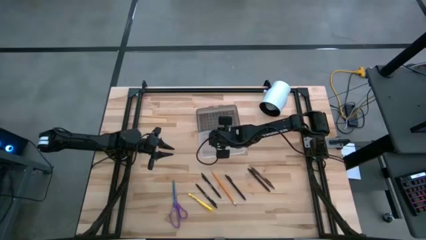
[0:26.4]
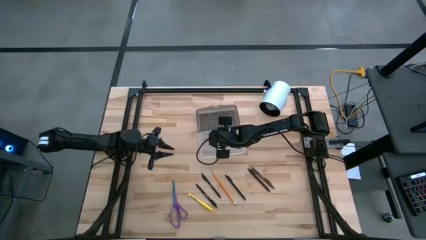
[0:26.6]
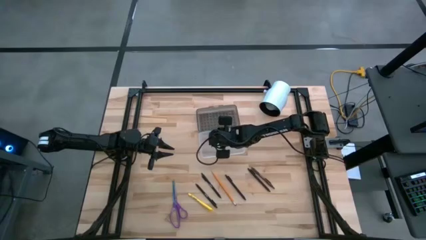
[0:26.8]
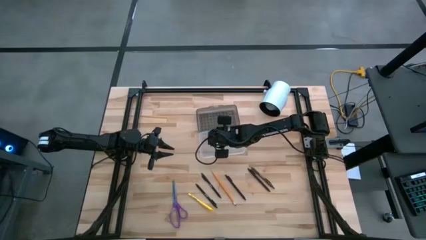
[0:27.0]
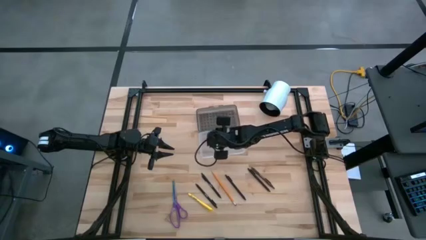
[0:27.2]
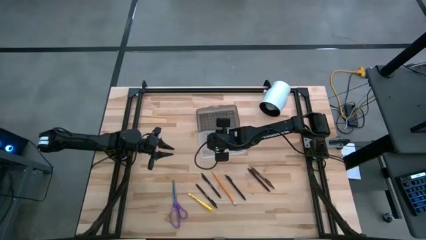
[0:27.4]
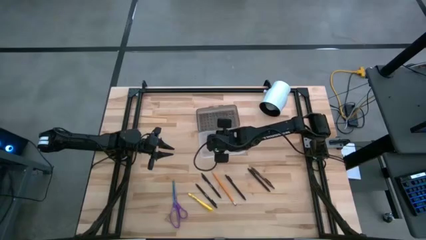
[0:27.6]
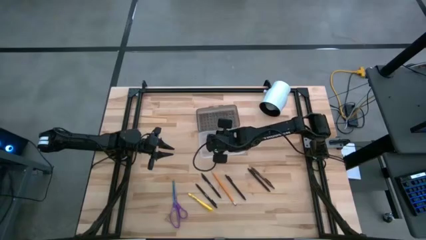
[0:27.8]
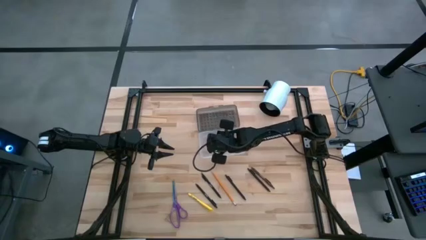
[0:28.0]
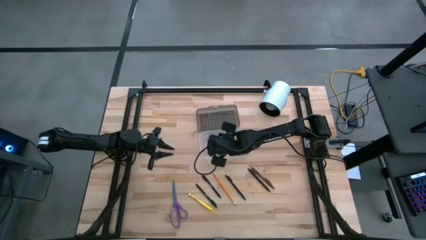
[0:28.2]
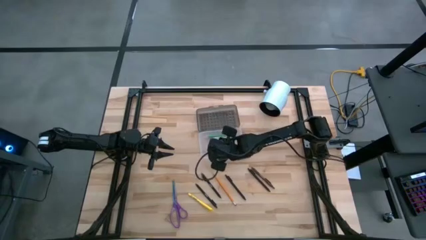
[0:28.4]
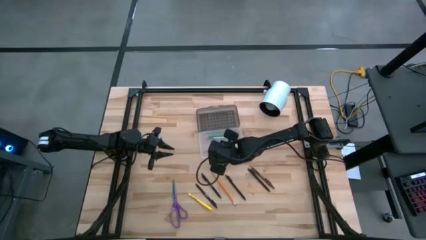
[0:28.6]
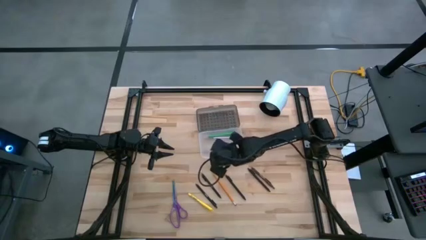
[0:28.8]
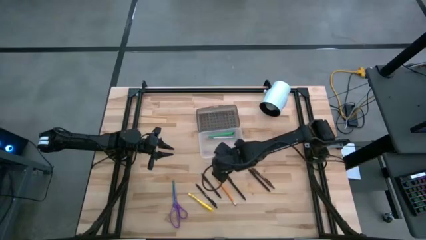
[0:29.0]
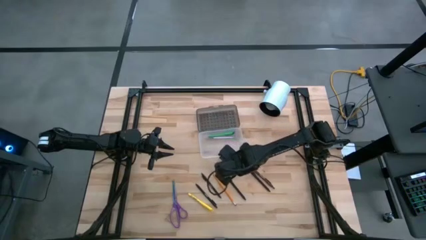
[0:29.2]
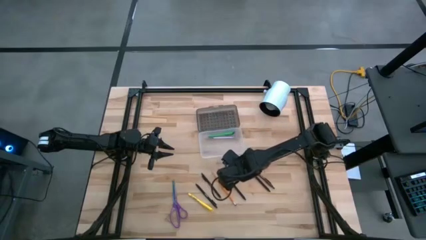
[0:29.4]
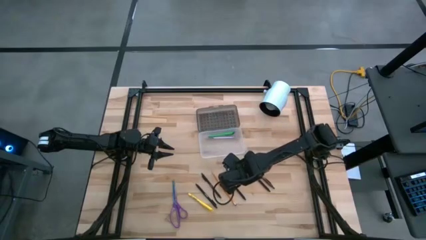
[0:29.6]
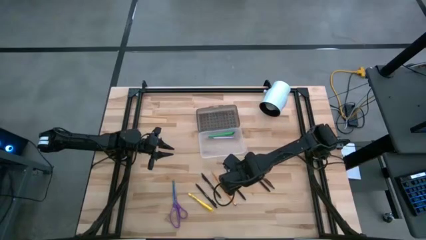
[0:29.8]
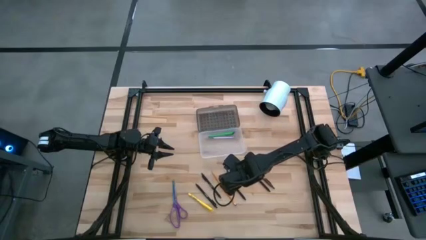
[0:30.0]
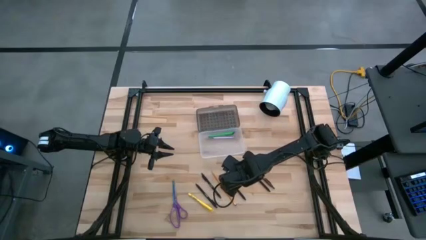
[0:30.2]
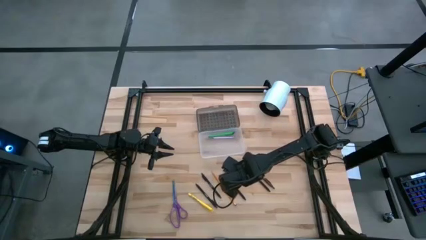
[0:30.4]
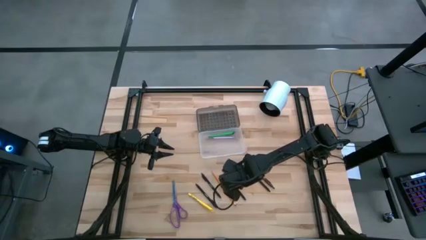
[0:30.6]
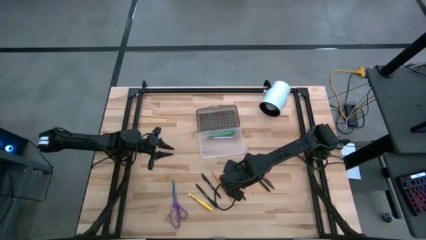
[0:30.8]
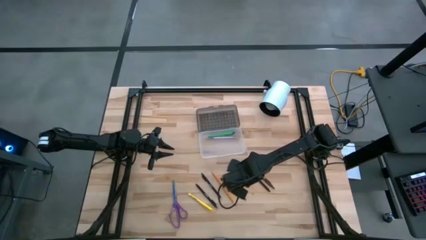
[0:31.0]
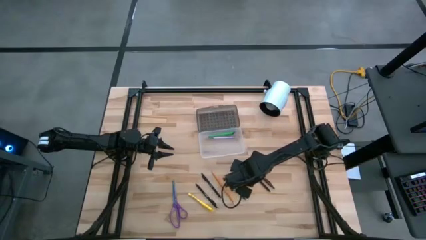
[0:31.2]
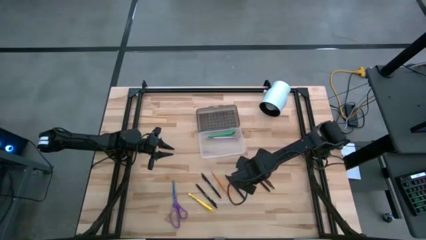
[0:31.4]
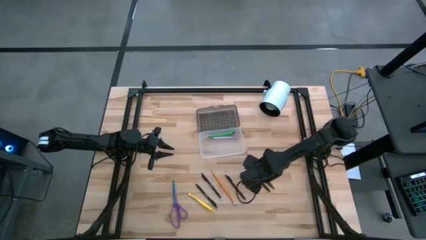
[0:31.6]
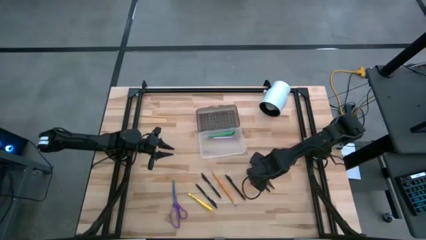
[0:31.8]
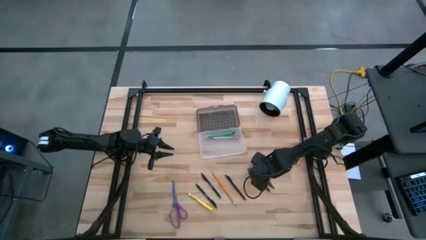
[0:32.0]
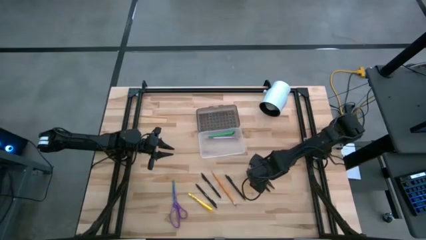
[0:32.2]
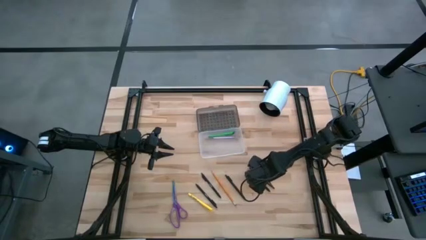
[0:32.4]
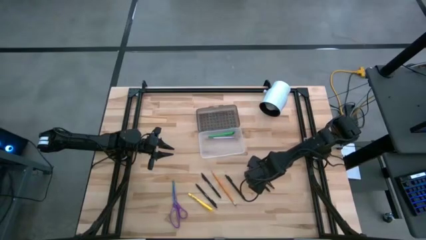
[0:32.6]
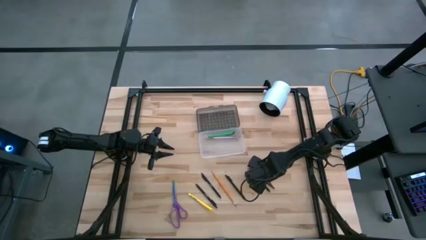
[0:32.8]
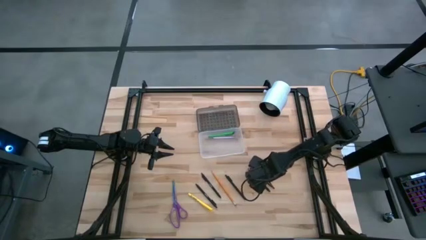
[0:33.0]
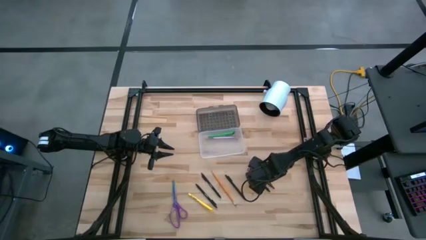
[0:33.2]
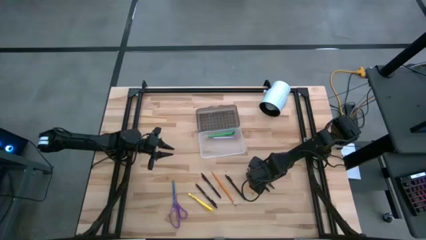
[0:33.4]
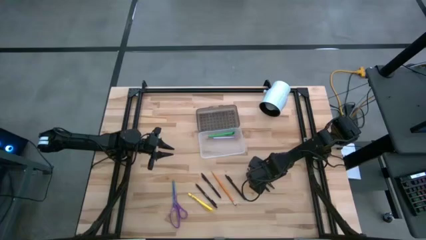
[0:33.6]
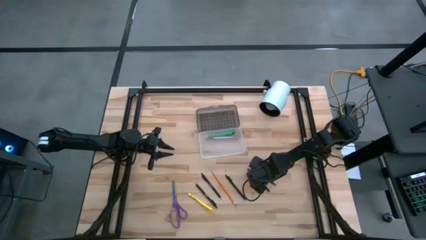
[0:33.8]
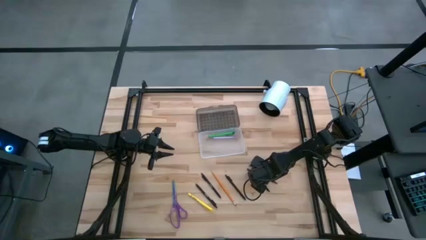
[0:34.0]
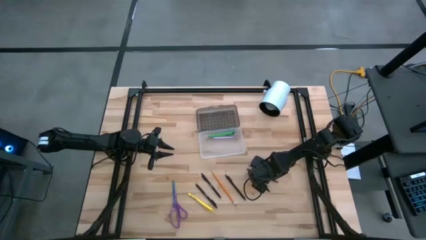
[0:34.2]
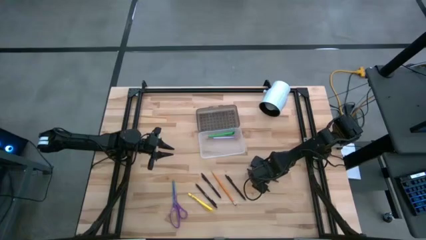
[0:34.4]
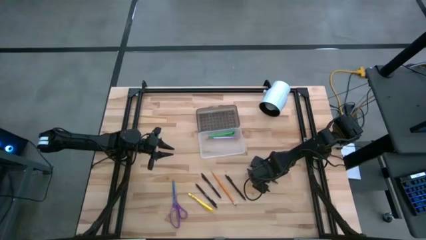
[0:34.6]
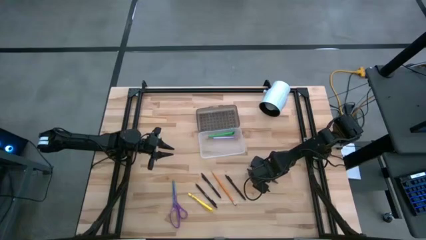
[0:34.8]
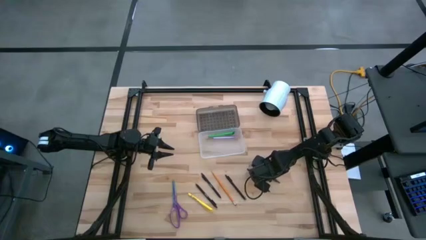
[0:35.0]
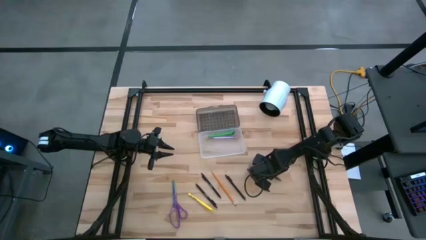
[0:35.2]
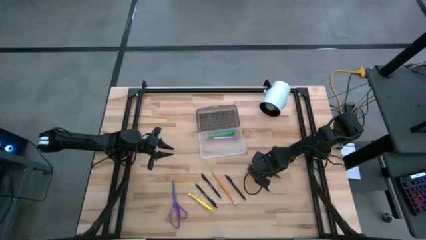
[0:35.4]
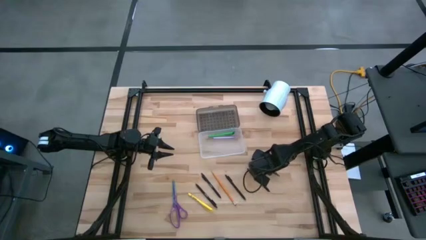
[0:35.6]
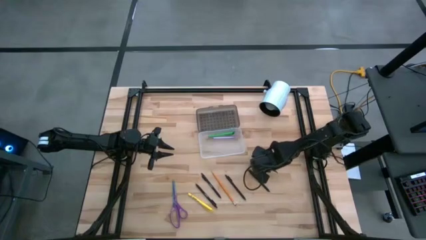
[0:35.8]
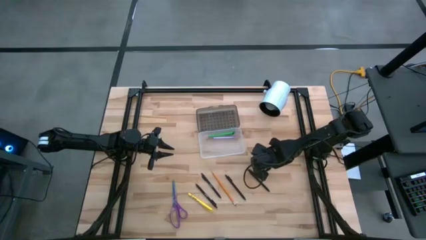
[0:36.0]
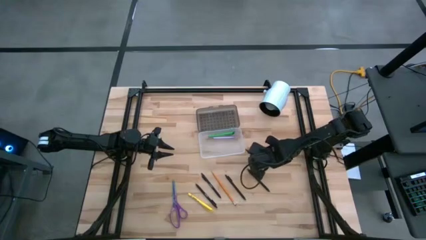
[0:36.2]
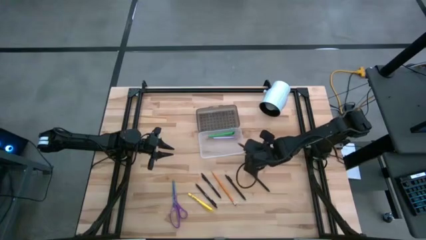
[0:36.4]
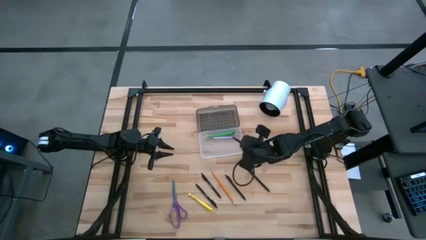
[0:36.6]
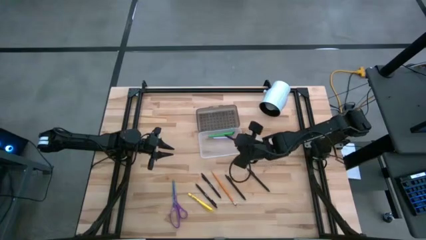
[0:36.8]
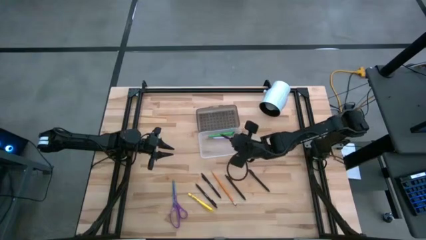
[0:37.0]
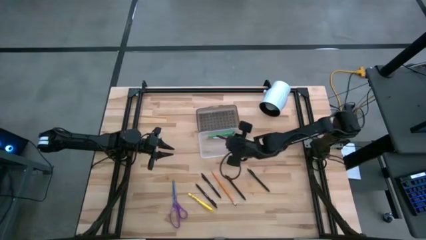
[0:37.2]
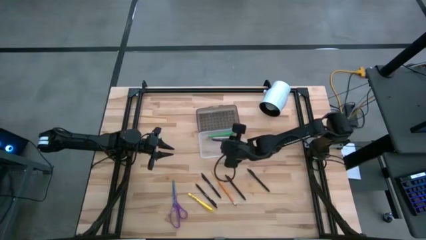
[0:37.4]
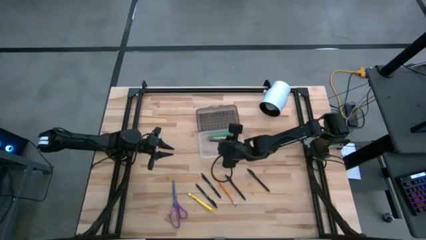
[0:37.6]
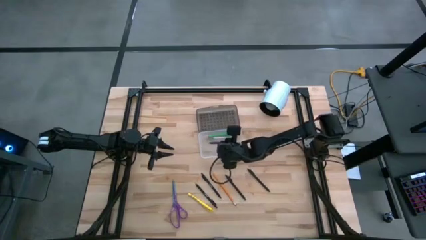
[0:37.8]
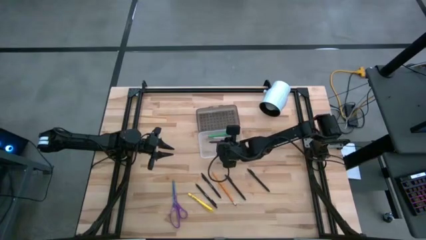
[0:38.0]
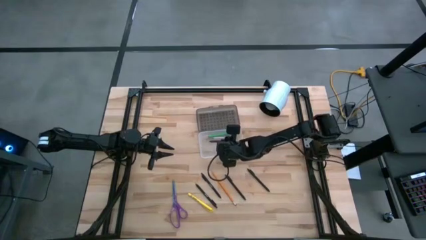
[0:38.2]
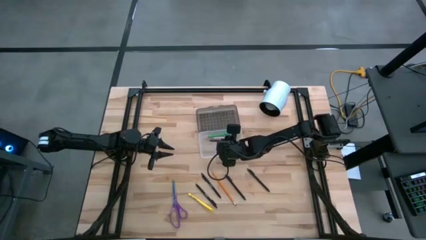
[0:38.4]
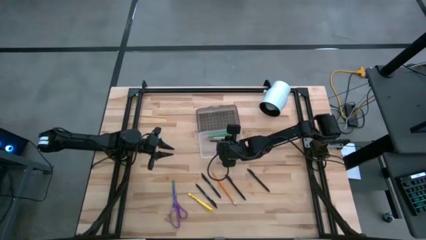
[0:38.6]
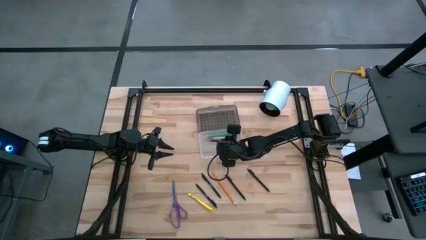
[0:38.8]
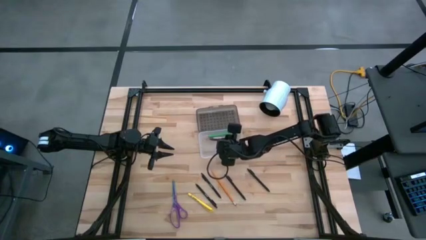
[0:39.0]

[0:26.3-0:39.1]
Task: Pick & place school supplies into a supply box
Put the brown pen into the transparent supply box
